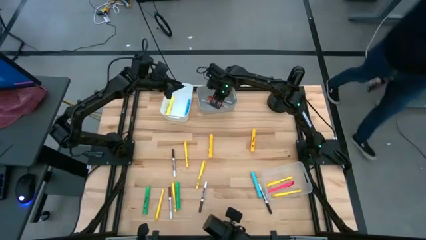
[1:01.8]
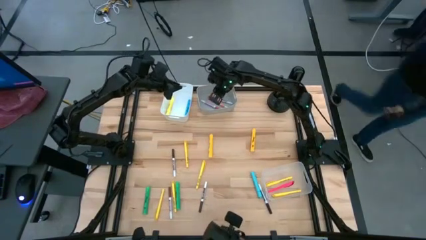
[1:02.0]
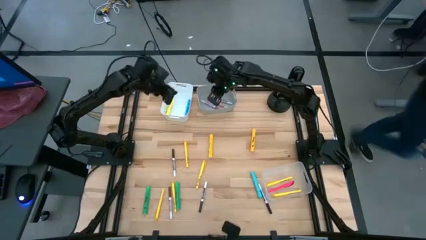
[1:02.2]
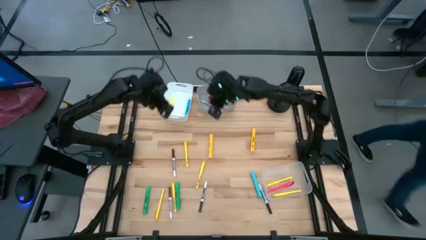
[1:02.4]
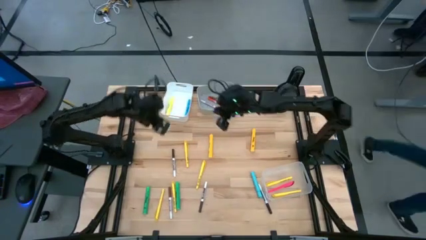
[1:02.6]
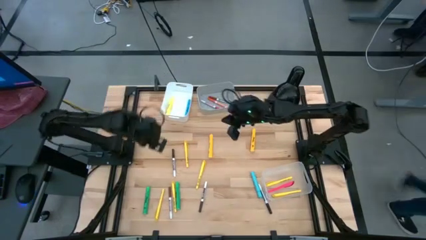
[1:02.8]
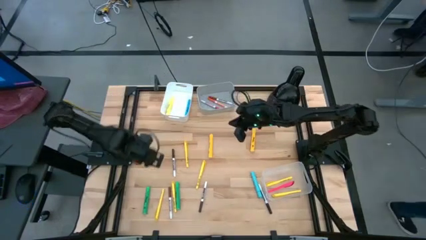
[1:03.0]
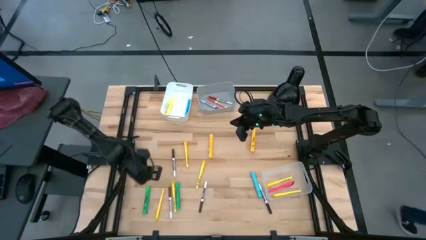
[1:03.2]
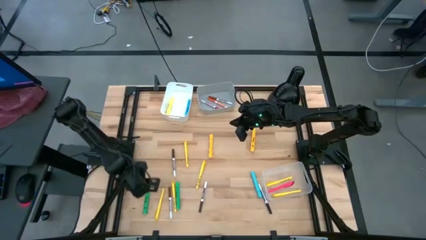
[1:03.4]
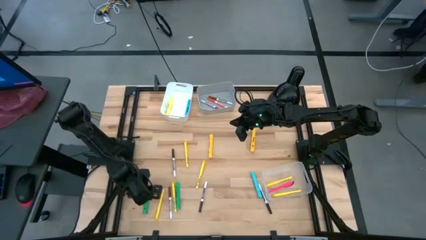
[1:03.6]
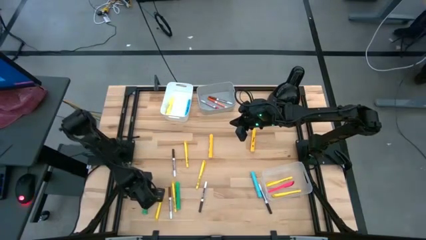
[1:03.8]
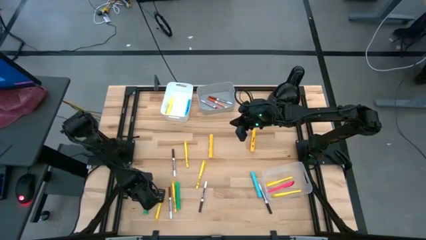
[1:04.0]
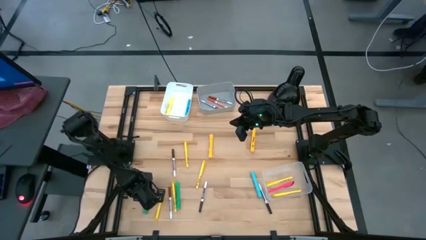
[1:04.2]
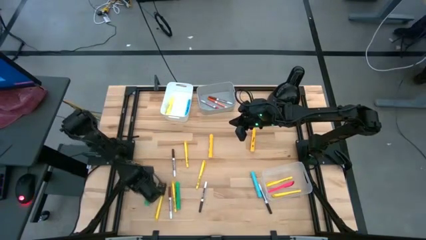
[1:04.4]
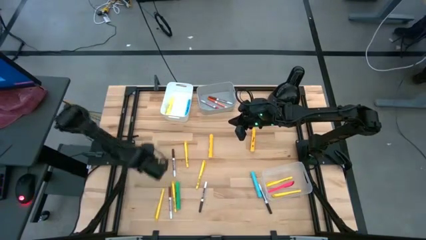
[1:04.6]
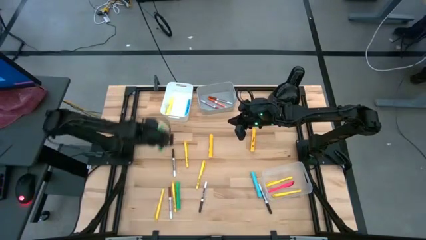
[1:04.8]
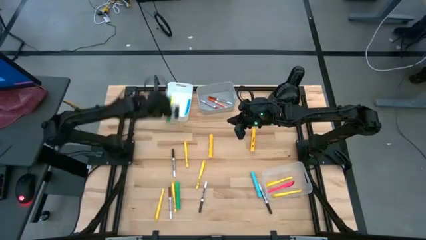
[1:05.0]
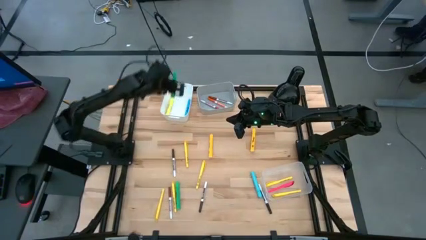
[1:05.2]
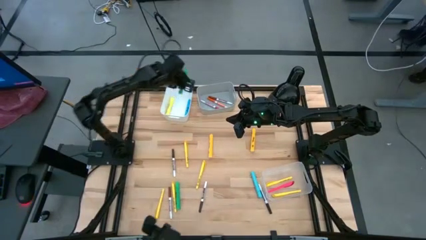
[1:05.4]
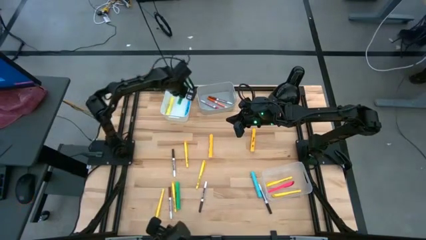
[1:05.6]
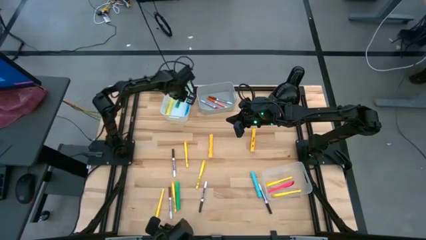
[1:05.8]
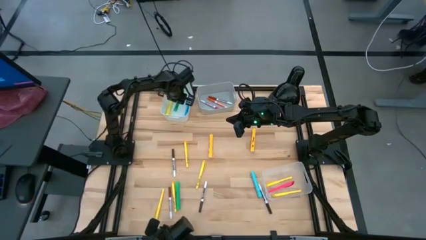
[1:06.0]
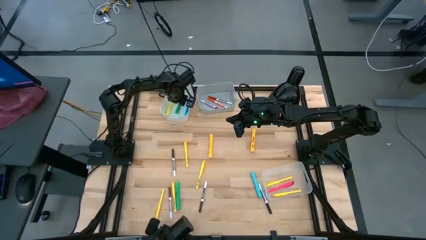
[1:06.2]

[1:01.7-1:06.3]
Task: Pick & Place Markers
Put the green highlighter pen into the white bin

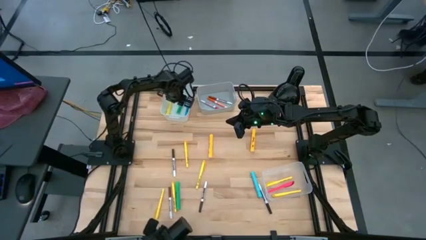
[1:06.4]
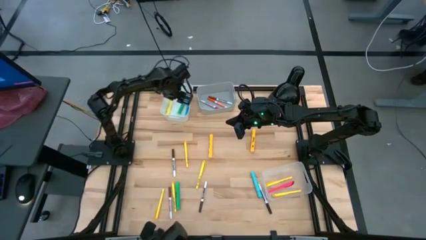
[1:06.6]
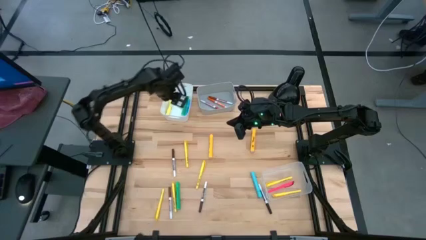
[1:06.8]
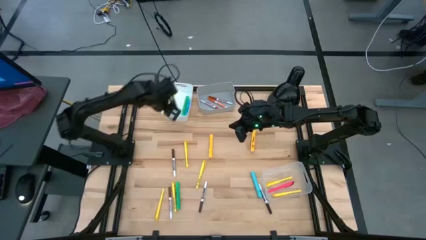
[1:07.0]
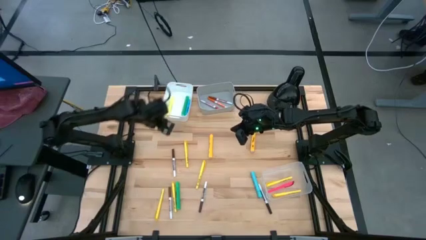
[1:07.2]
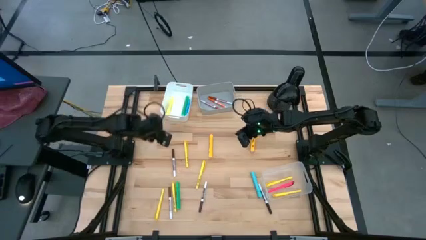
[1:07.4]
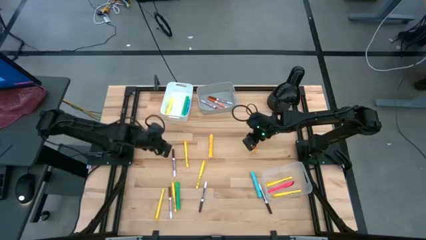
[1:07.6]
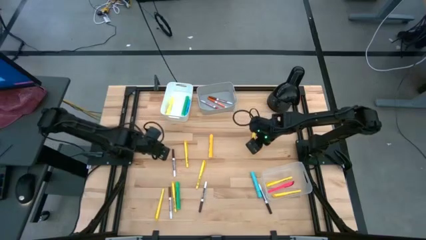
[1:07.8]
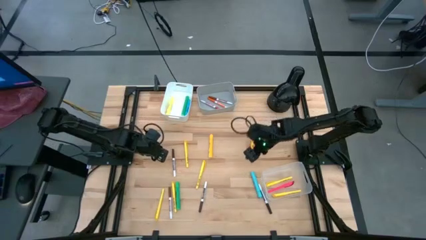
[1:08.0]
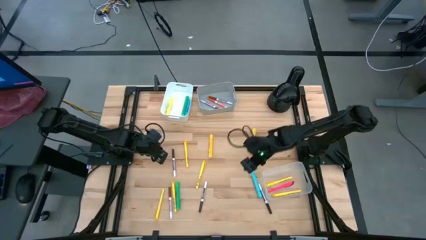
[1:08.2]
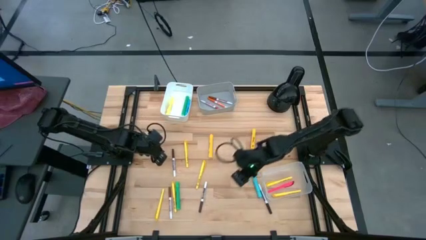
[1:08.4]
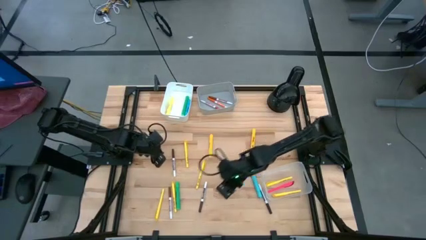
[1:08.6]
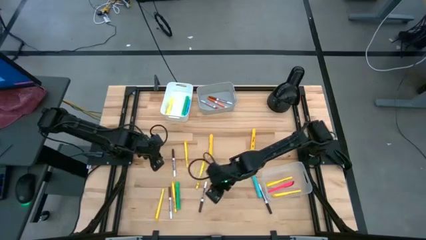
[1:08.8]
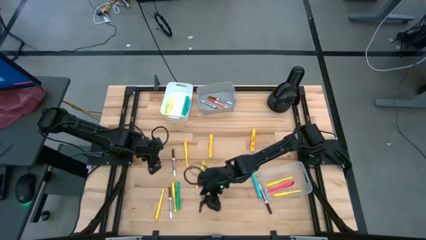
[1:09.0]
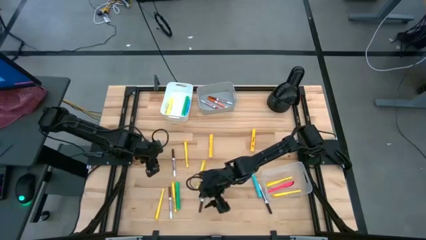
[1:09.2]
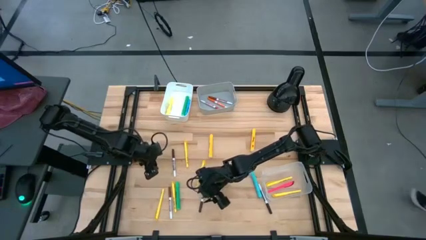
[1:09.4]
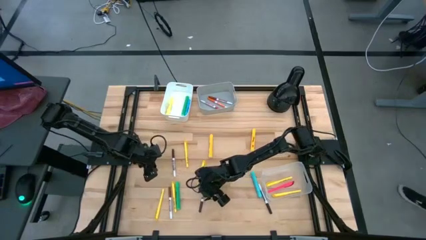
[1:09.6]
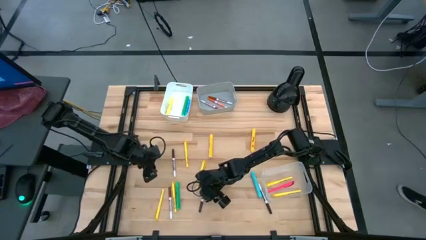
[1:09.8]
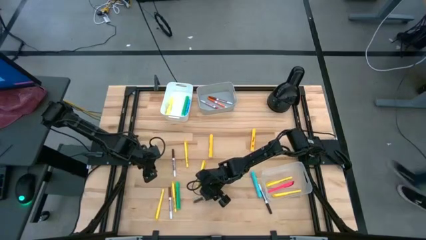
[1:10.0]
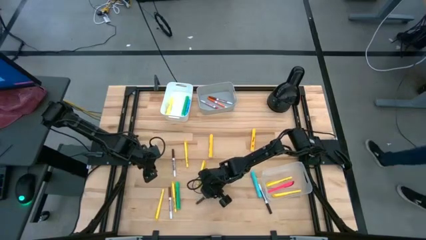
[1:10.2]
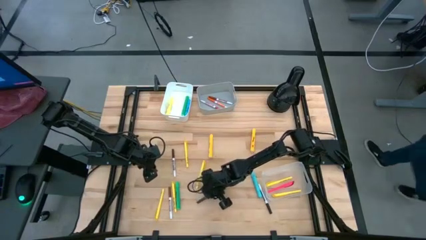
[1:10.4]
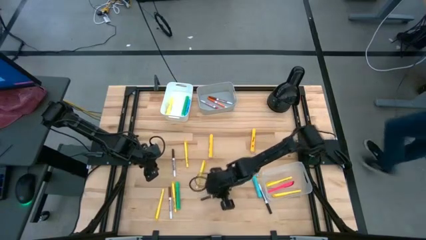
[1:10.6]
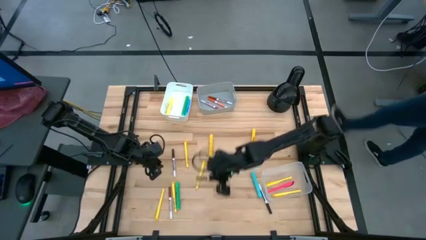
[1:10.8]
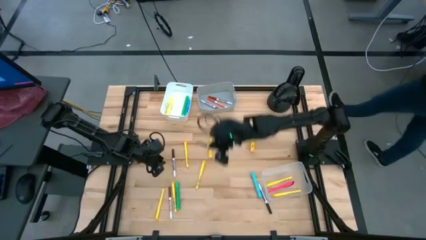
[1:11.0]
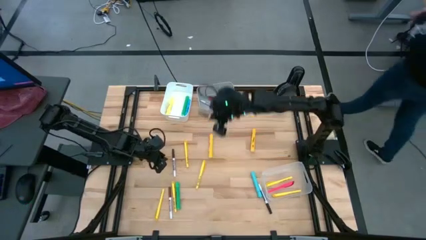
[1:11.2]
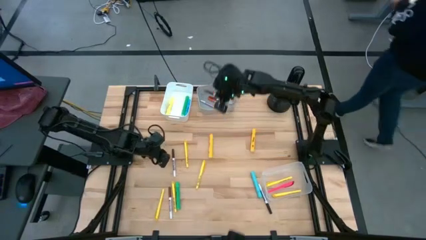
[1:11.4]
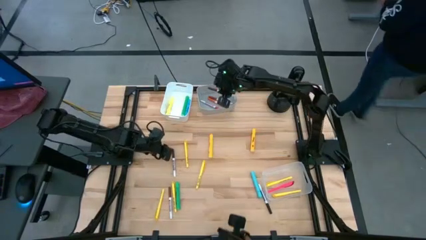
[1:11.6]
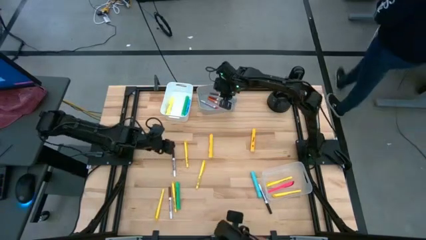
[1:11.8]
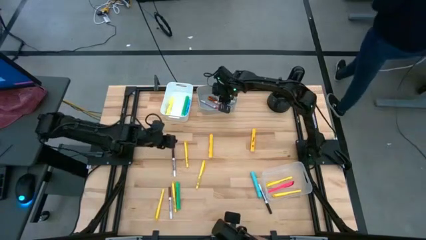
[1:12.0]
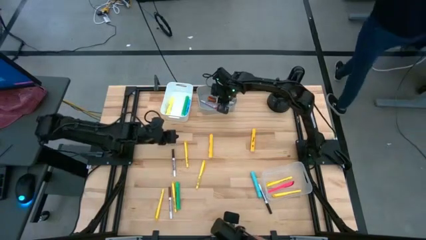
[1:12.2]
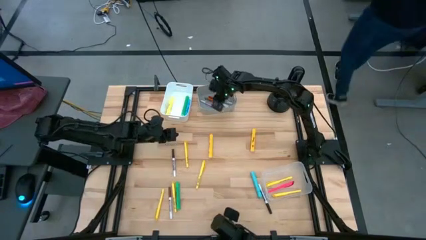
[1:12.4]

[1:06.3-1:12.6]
Put the brown marker pen into the gray bin

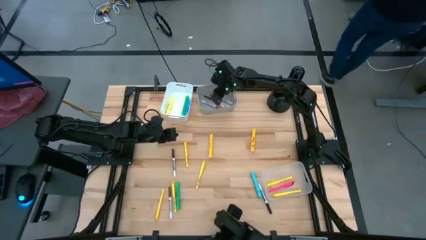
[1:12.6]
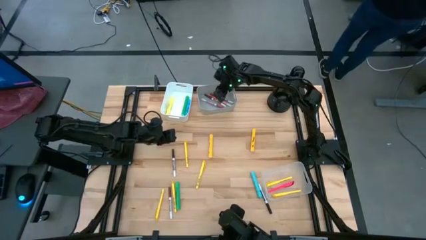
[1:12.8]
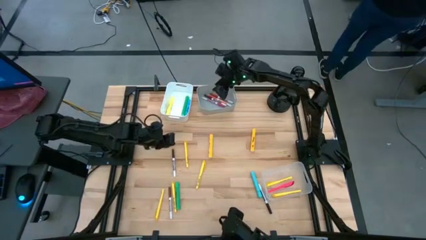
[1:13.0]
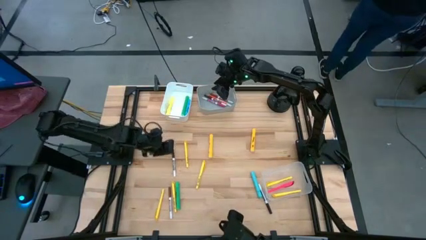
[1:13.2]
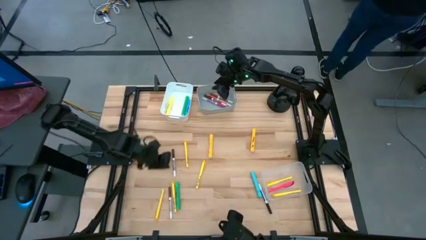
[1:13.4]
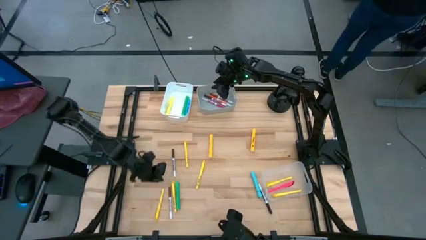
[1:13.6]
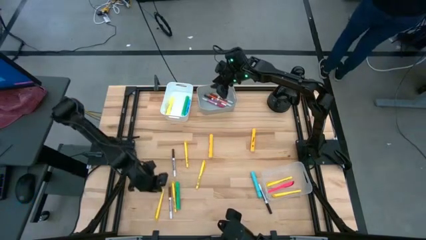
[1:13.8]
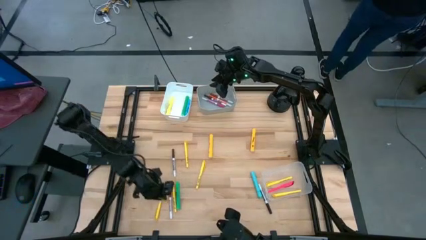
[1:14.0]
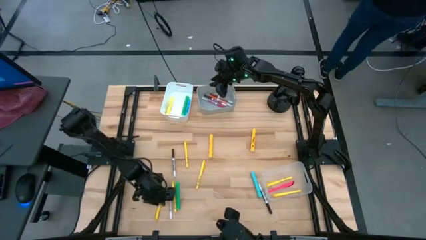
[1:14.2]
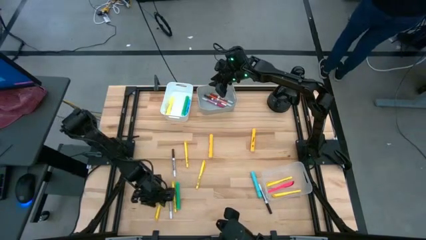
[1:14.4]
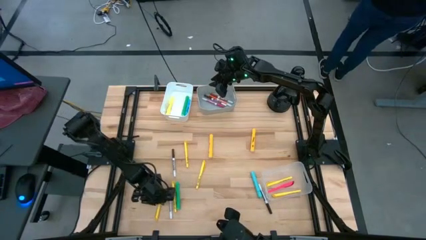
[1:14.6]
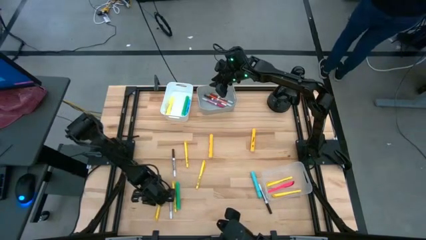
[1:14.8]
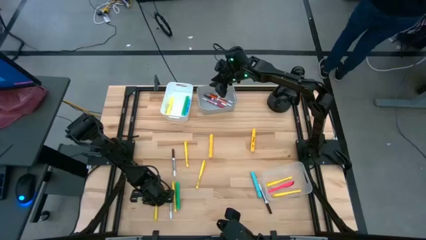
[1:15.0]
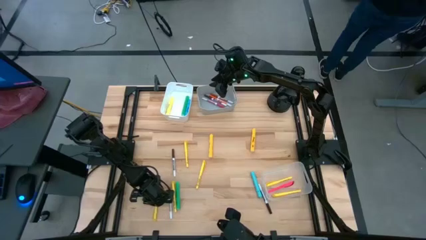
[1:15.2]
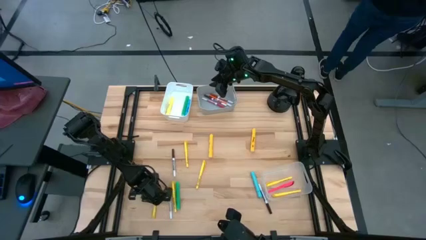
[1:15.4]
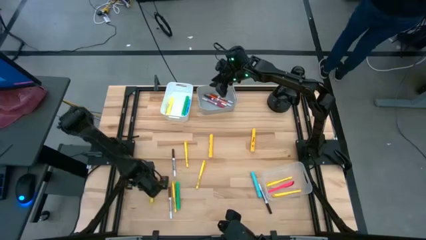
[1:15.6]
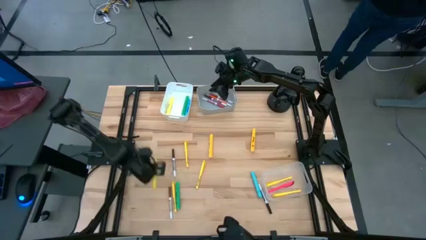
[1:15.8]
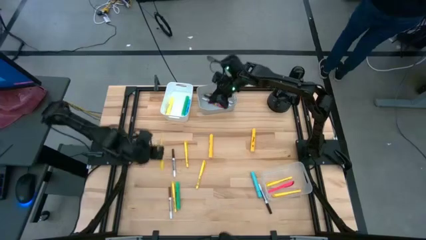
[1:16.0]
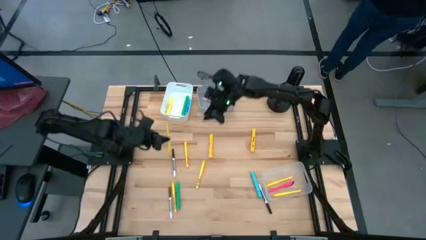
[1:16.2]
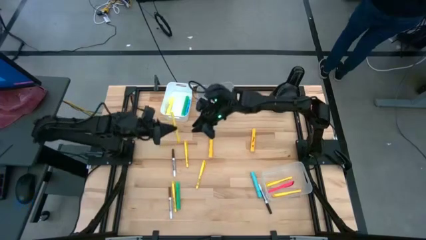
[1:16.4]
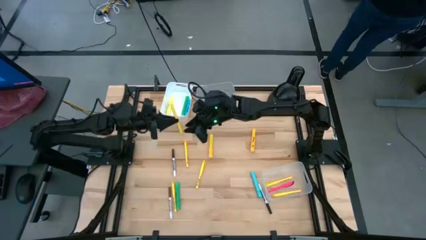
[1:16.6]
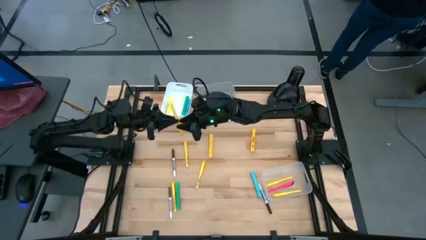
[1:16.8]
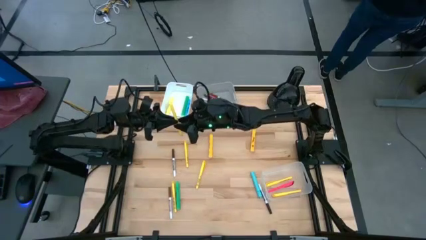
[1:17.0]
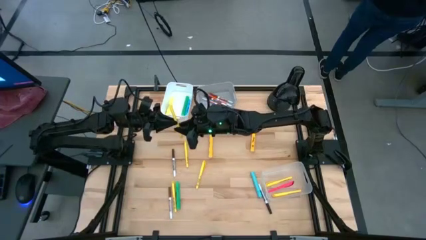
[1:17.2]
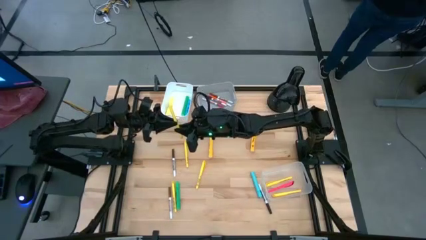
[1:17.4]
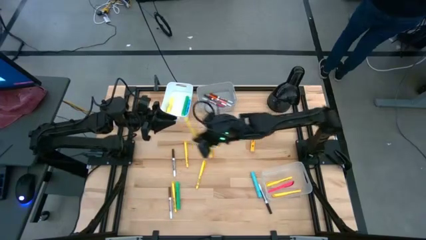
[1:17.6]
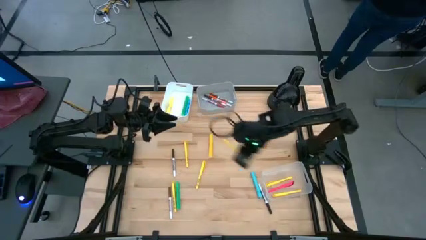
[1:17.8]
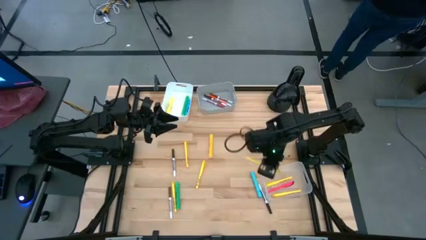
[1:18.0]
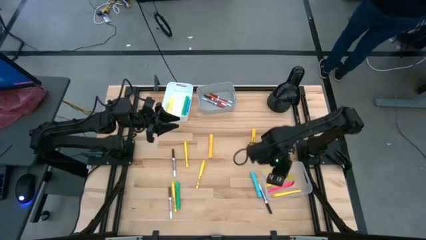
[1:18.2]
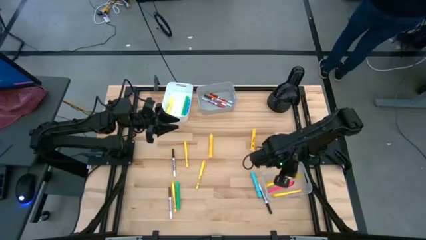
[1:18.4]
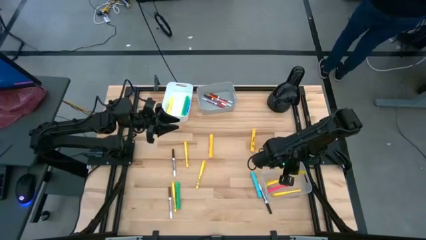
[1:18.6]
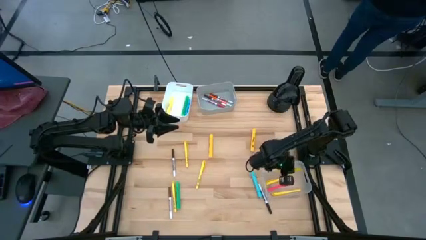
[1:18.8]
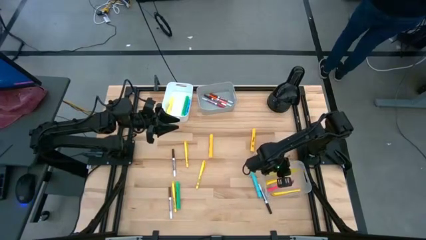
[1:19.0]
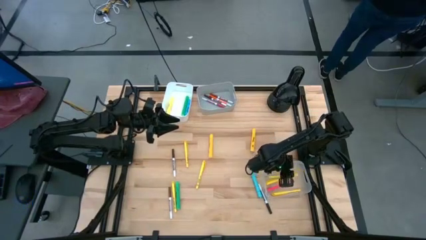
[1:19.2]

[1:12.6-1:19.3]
Put the yellow pen into the transparent bin
